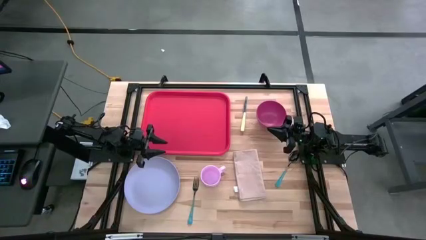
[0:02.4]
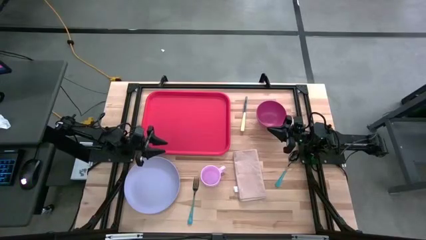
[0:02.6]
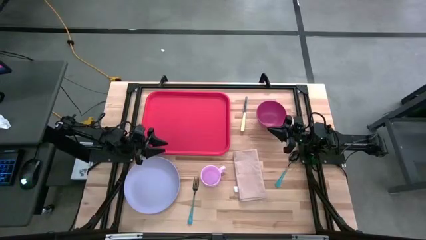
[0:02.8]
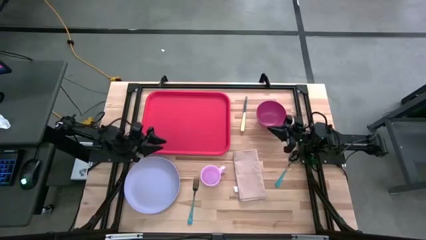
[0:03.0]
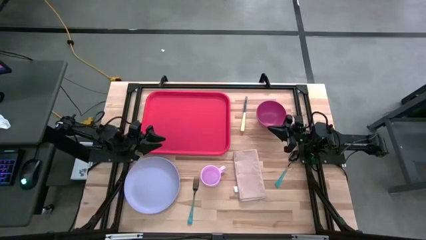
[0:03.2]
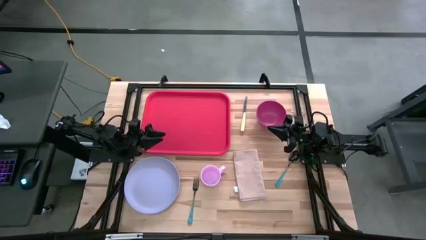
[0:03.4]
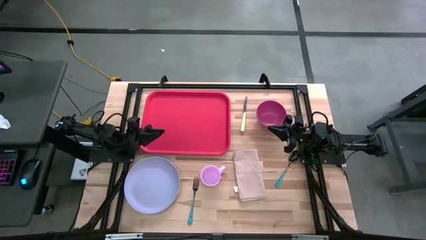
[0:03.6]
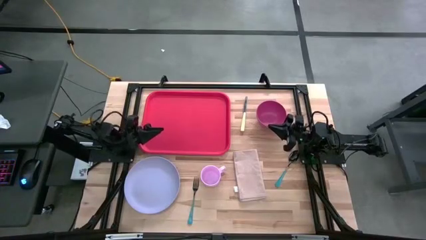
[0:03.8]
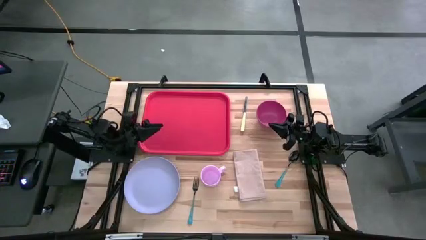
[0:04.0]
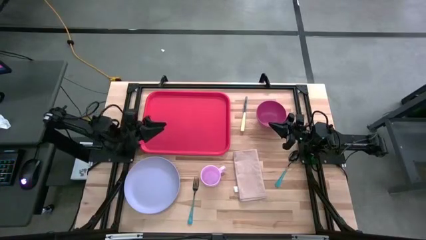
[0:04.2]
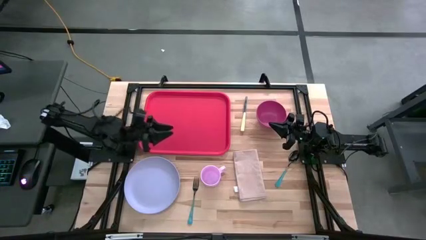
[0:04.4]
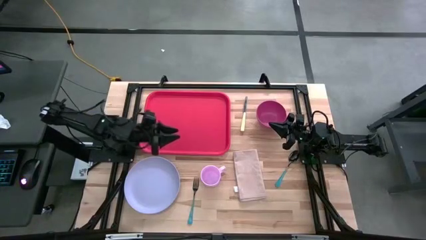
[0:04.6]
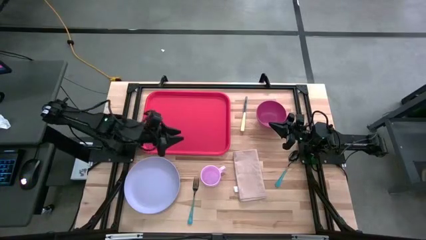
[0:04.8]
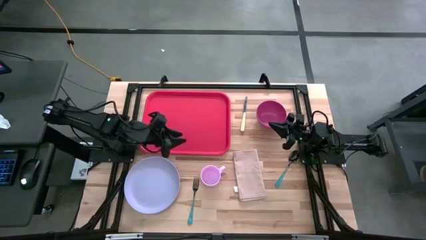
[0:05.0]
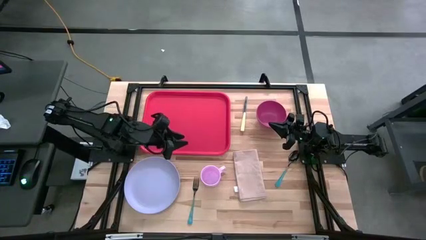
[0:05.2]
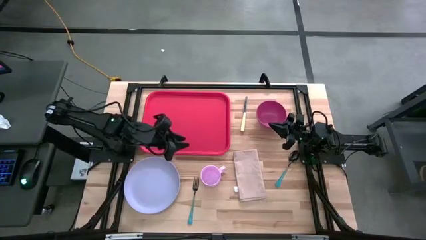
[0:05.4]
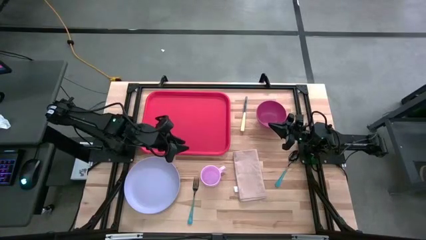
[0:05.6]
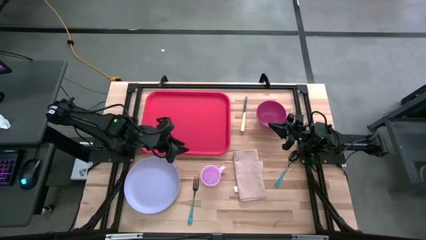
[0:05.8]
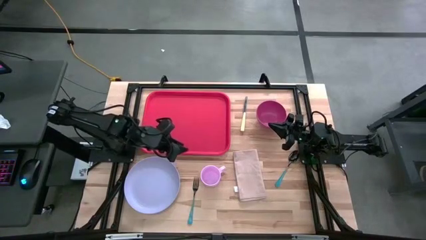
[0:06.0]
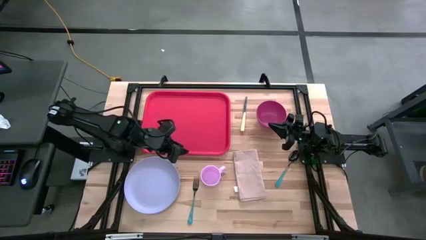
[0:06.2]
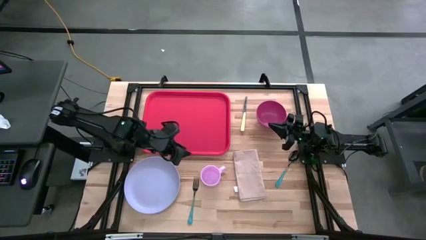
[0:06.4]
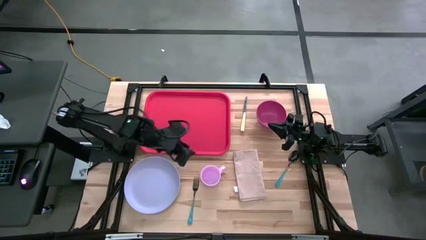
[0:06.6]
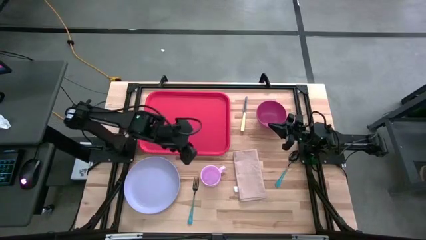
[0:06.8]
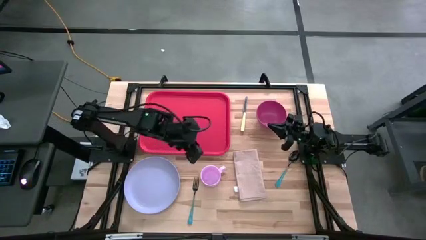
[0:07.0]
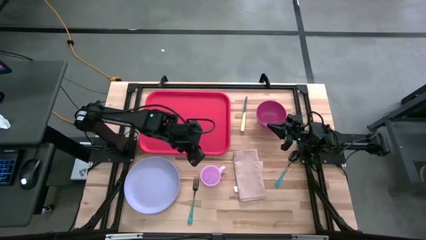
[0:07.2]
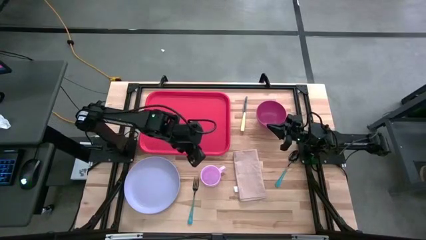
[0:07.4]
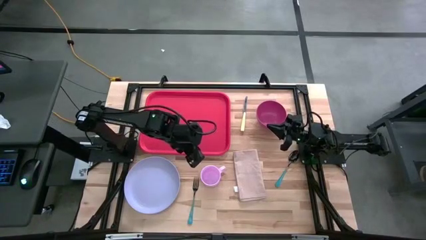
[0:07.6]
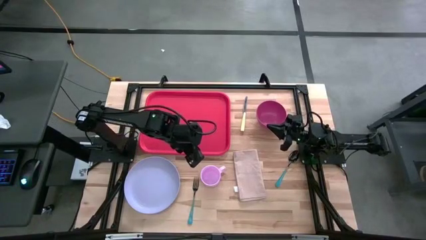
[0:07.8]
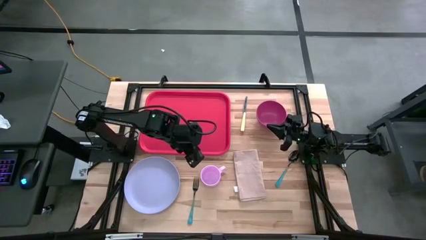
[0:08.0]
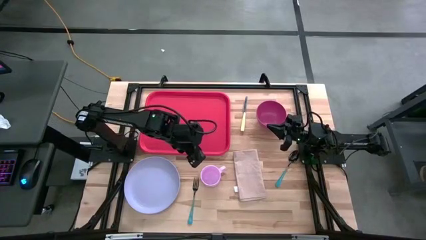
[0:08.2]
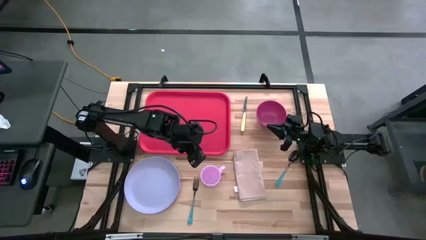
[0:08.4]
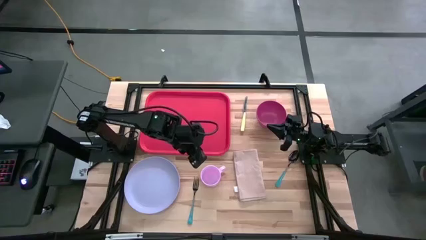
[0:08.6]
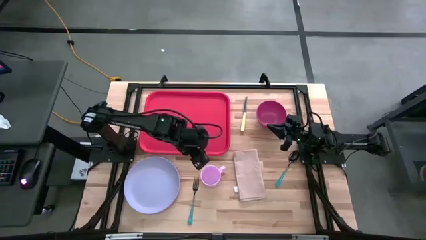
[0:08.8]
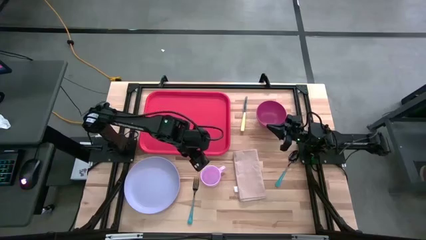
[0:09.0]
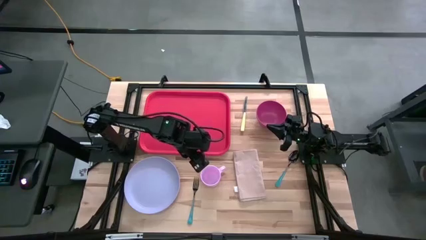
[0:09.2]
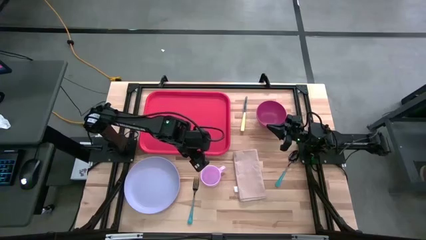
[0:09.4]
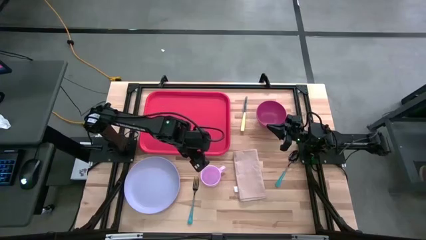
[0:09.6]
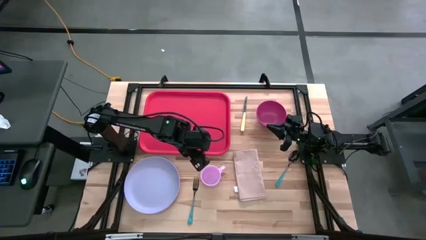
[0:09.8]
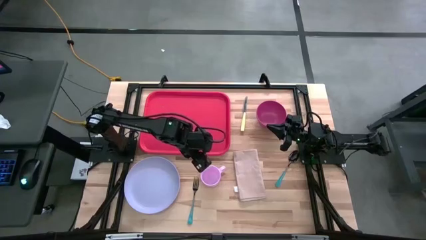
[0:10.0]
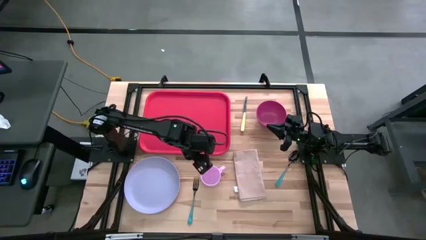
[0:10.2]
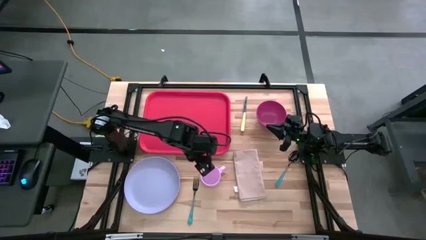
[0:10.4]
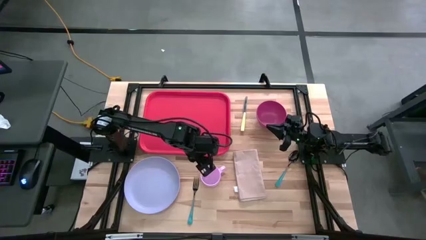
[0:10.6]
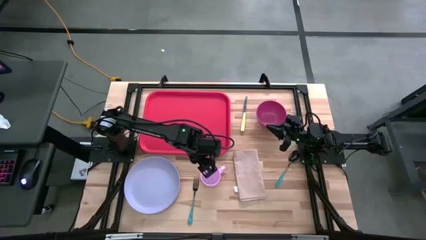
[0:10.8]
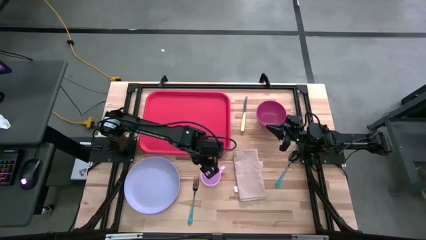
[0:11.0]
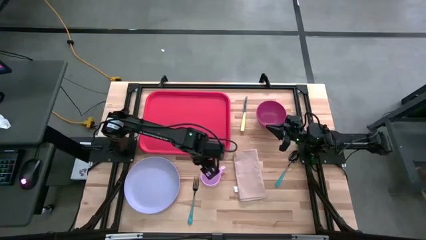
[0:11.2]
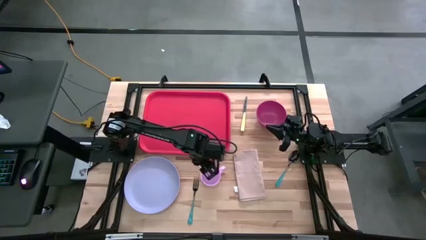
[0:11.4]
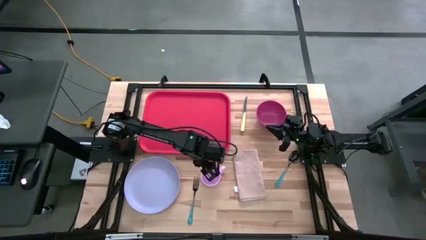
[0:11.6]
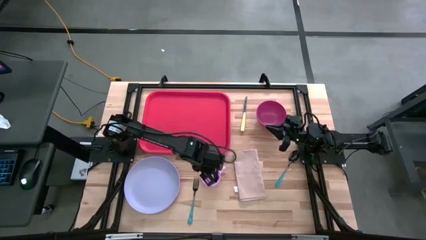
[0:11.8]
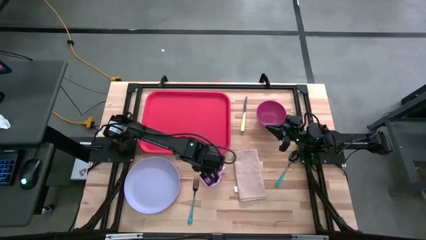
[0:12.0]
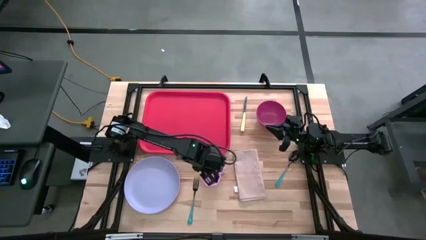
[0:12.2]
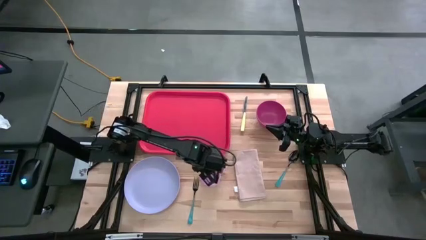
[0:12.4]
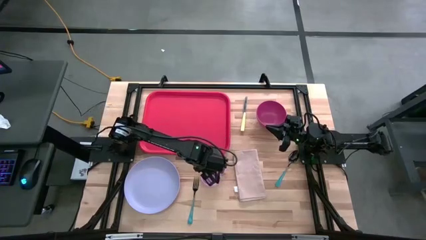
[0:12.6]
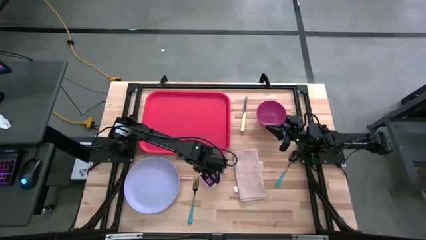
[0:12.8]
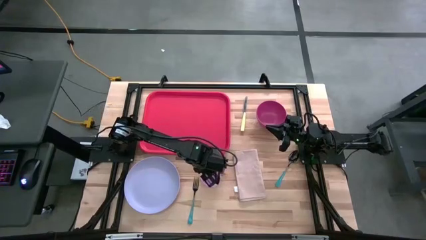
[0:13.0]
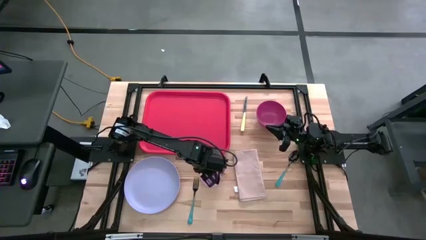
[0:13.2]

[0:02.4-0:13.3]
Task: Set up tray
Put the pink mug on the red tray

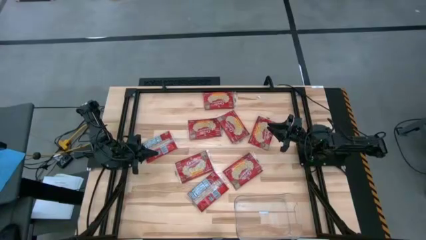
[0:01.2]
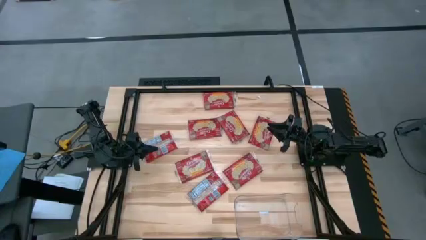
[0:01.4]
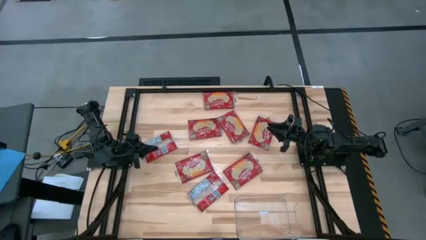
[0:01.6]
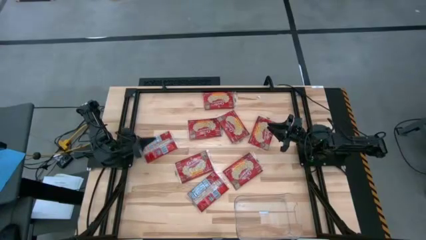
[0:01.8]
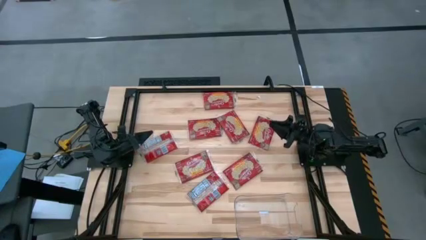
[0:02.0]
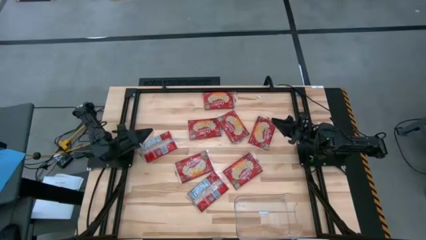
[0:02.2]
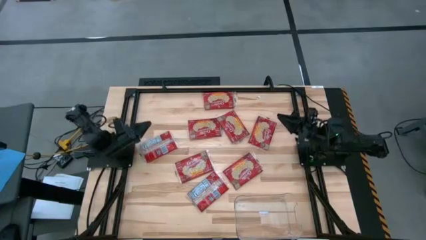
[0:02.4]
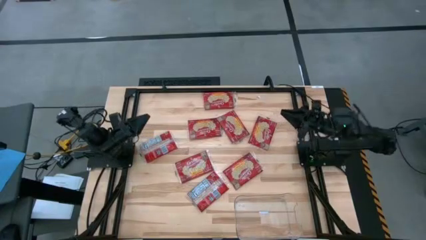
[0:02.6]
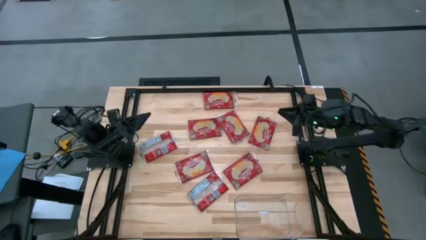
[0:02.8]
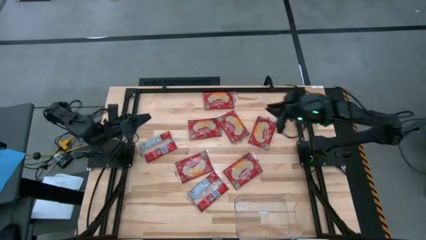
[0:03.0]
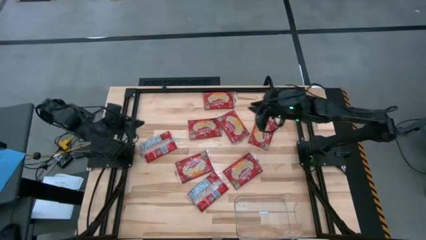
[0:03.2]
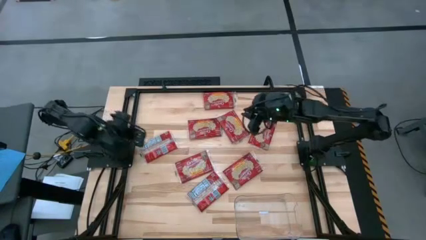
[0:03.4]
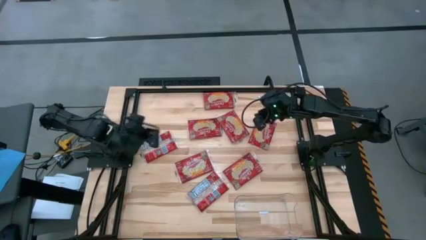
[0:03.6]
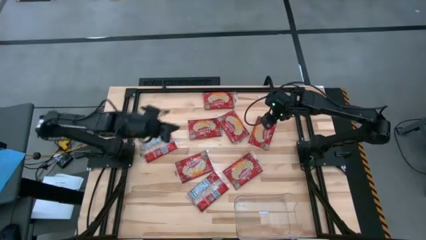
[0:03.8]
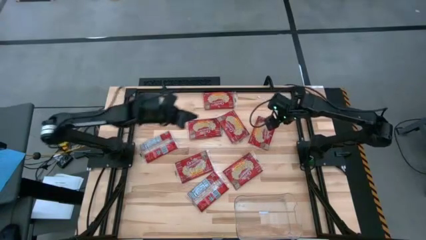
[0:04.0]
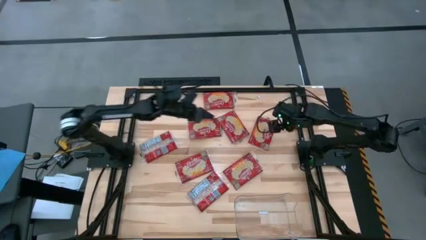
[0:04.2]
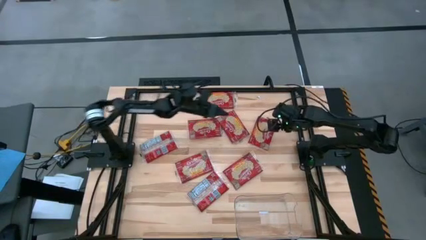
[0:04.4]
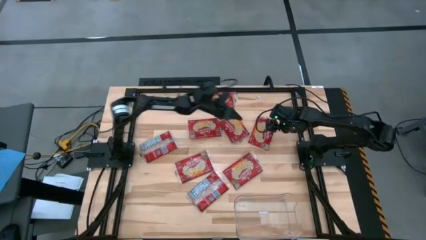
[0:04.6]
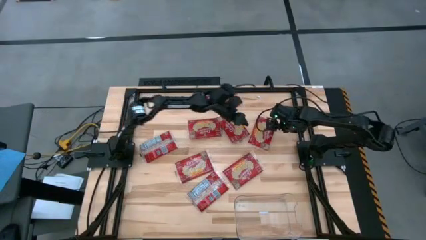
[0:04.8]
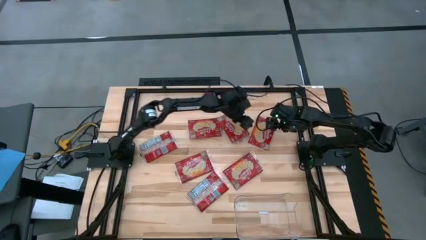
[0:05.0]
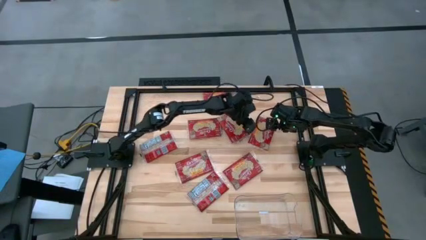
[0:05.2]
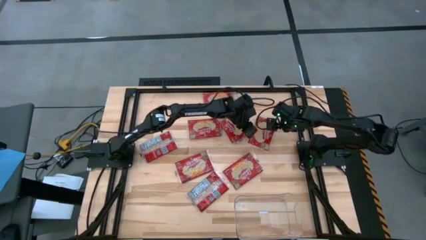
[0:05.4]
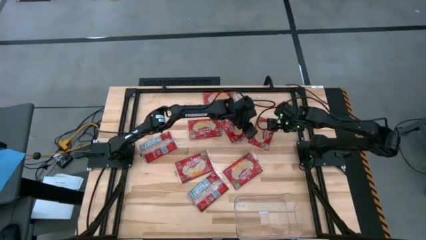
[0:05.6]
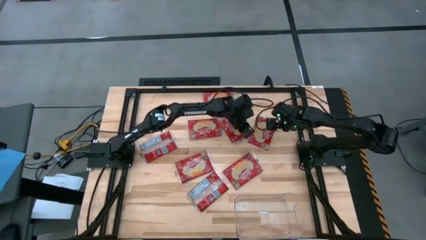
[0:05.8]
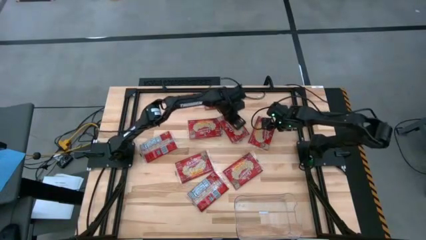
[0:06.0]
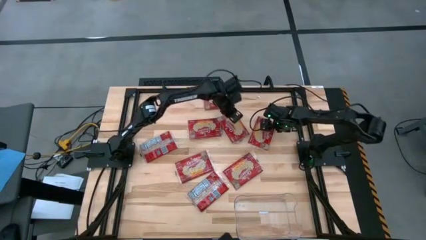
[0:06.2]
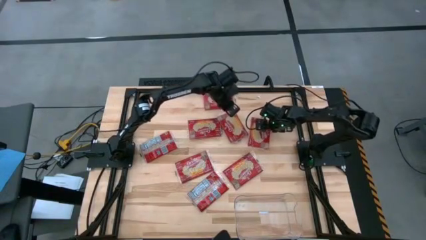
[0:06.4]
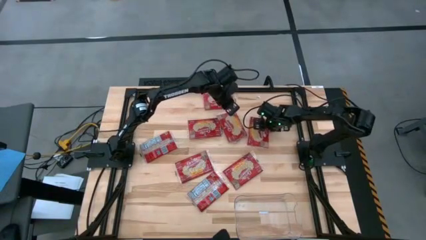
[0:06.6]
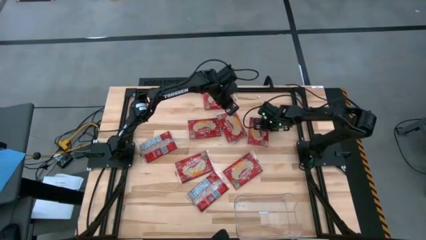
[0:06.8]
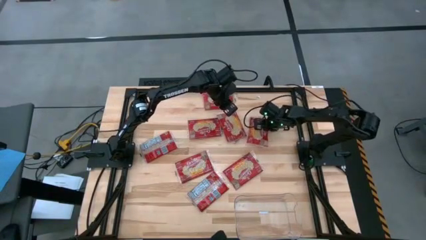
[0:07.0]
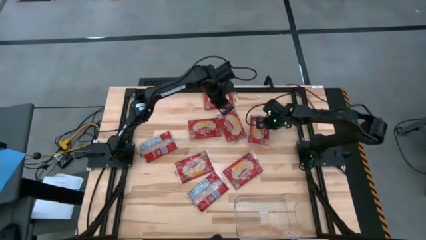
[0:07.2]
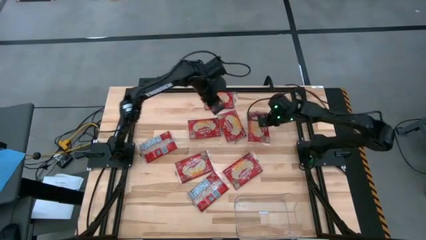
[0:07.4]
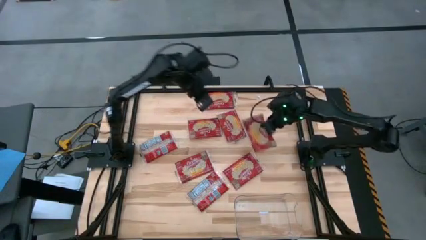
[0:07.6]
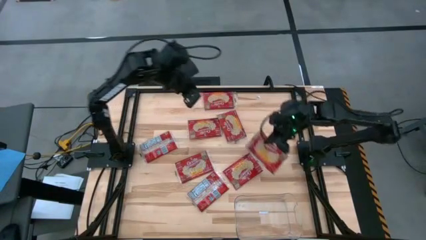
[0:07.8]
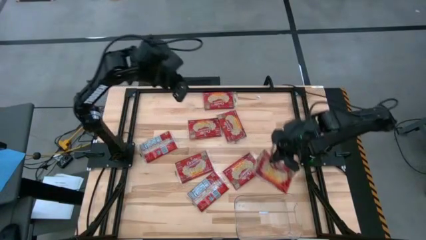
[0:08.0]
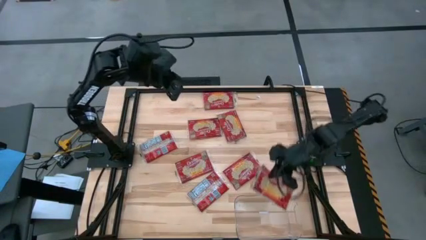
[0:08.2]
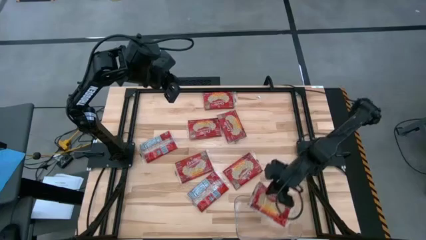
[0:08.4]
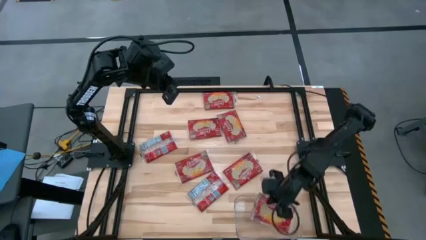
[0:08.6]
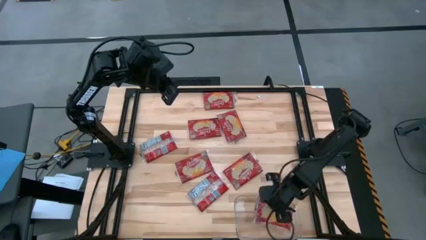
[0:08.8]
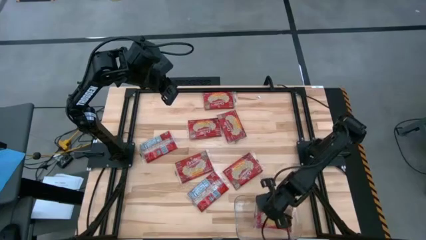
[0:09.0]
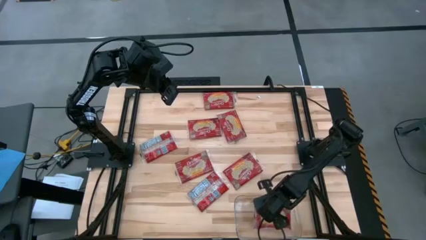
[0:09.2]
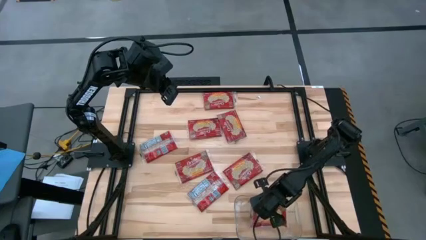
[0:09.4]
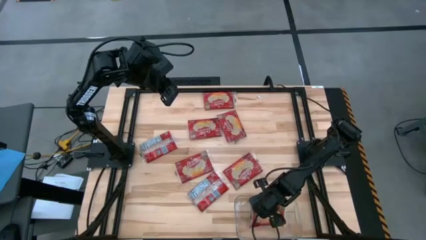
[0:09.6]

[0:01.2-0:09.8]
Task: Sort popcorn bags into baskets
Put the red popcorn bag into the transparent bin
